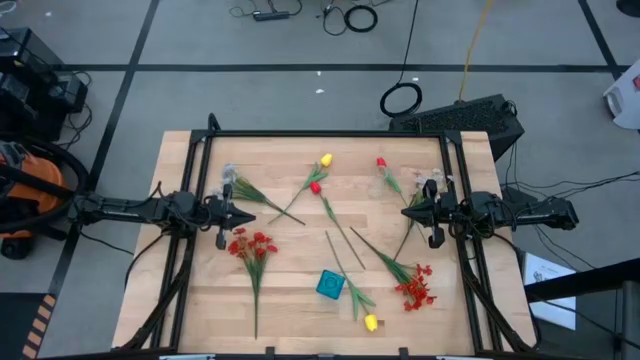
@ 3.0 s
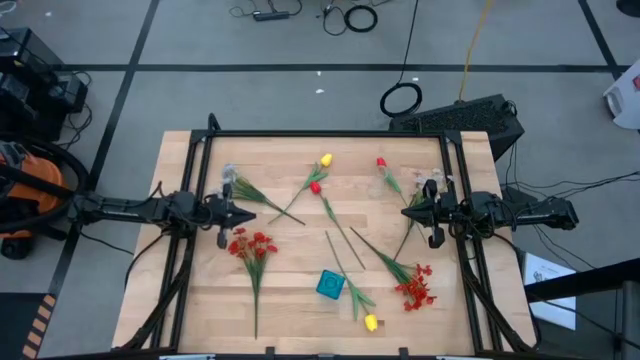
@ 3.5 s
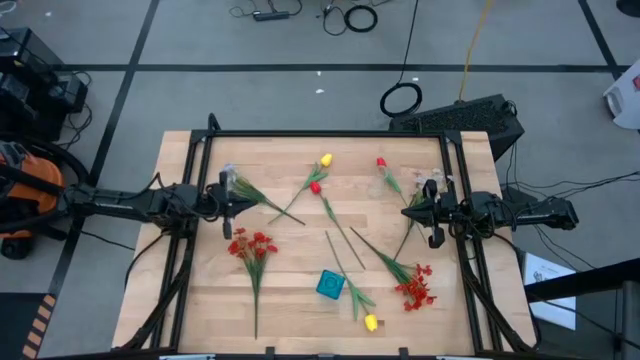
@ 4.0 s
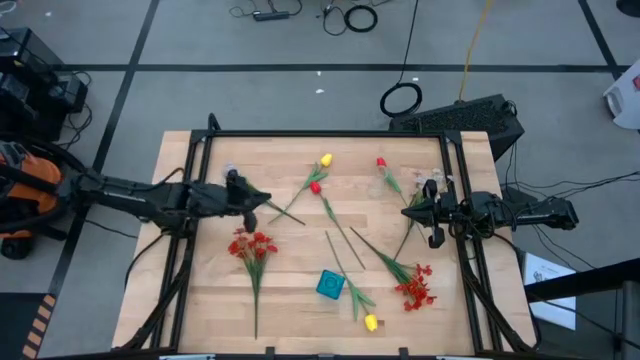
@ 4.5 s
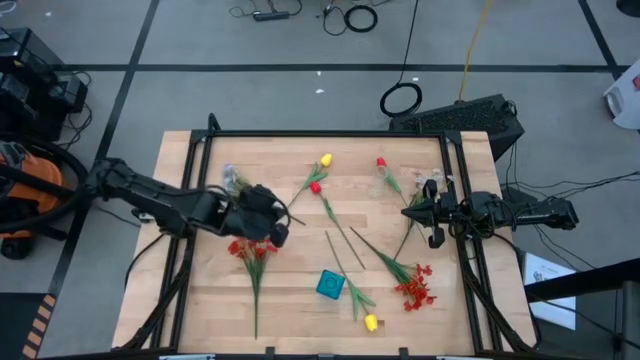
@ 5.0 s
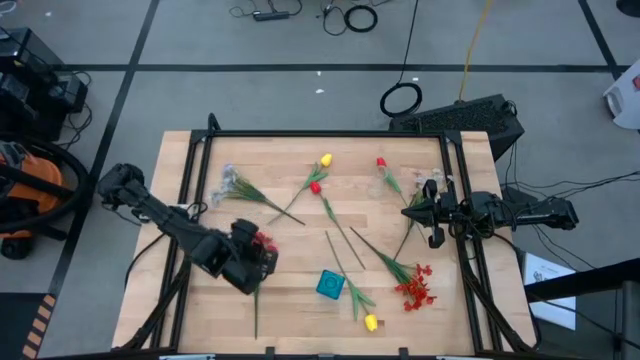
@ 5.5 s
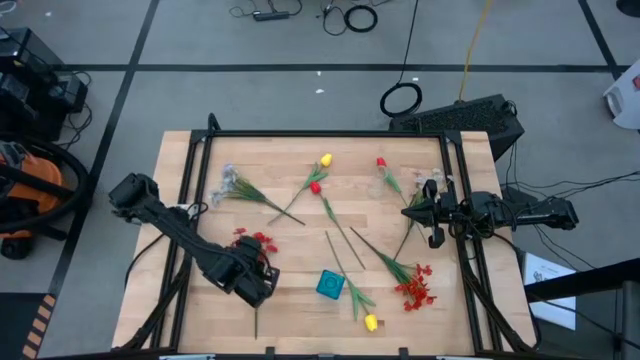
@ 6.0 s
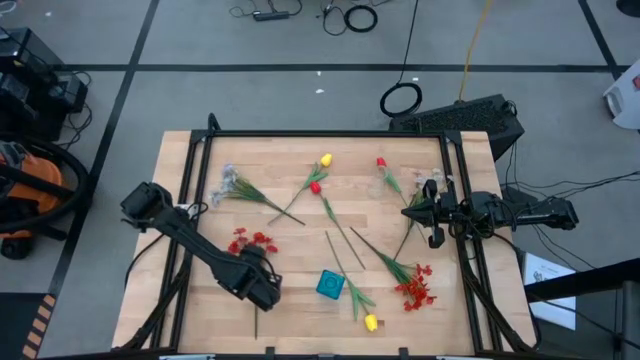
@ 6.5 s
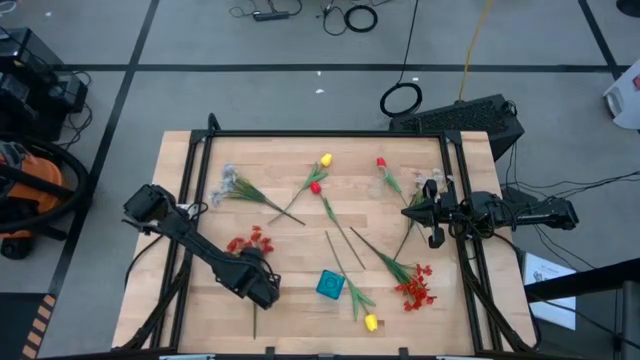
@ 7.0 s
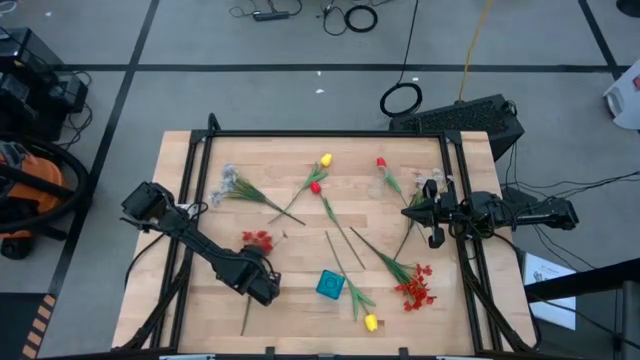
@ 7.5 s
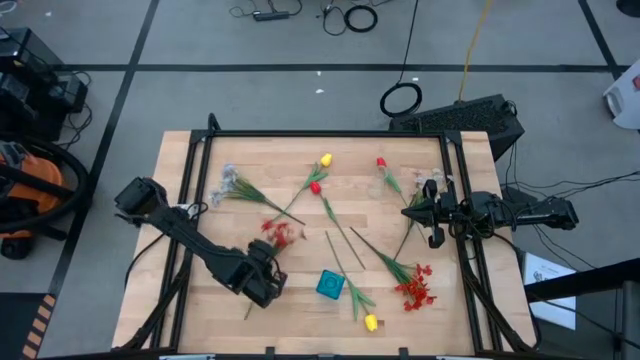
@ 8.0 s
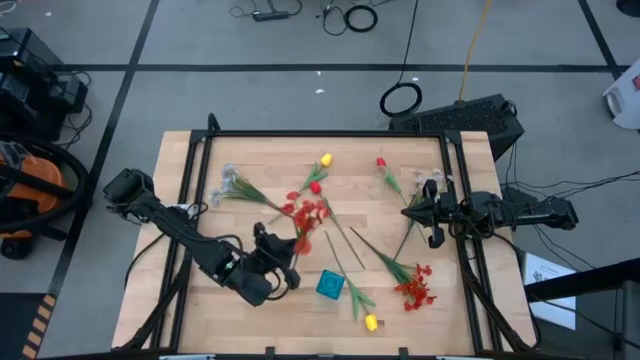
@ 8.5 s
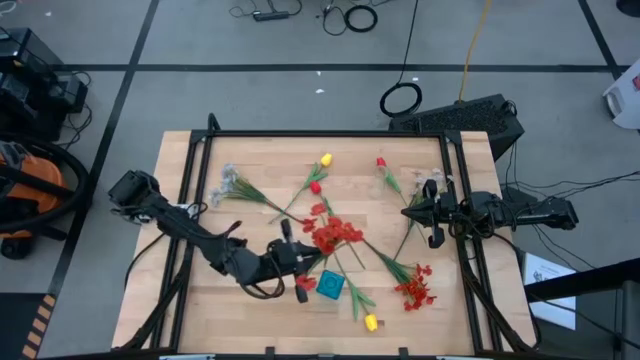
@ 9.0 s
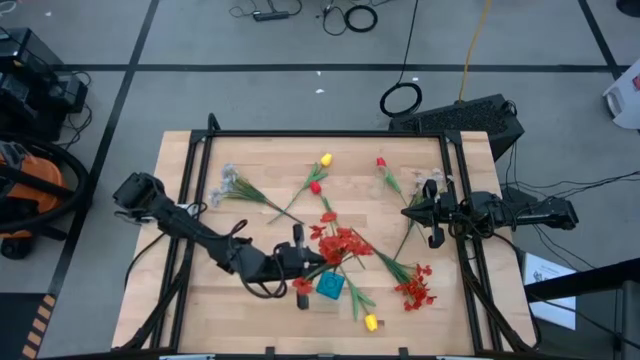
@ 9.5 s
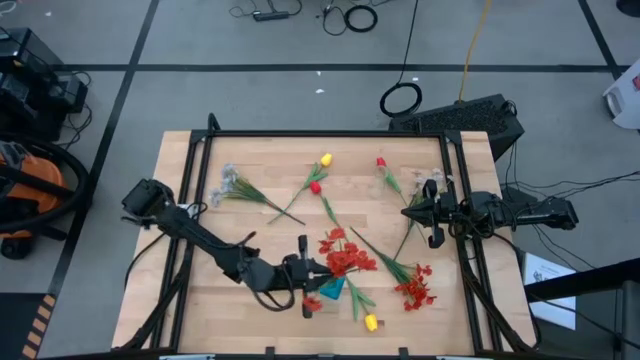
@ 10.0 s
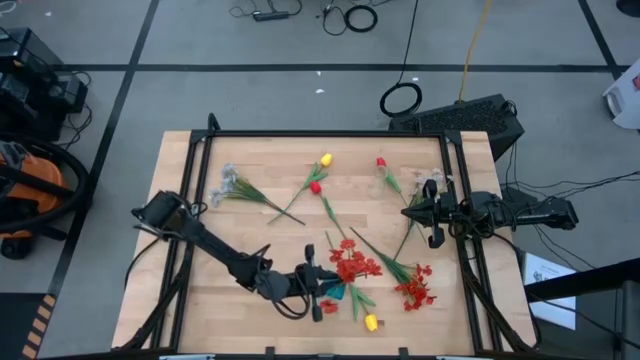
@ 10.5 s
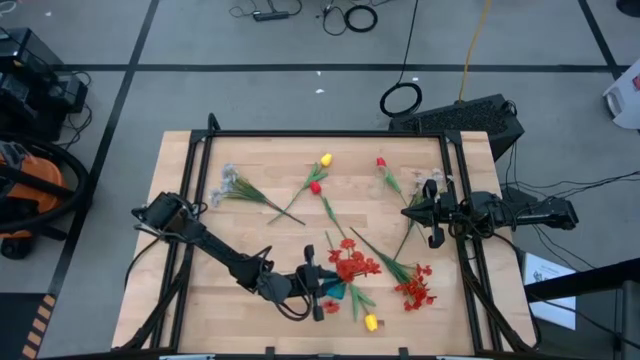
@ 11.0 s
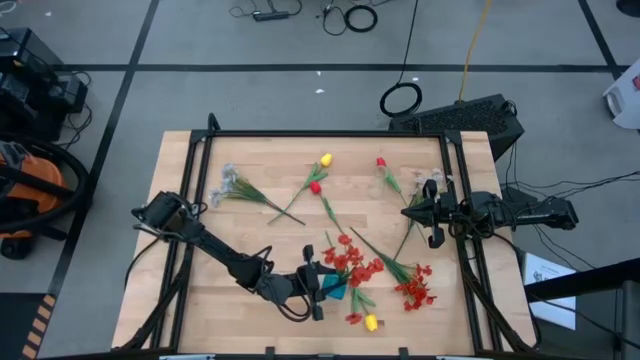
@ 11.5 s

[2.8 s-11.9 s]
Task: Sort flowers into vase by color
Put the left orange flowers into the blue vase

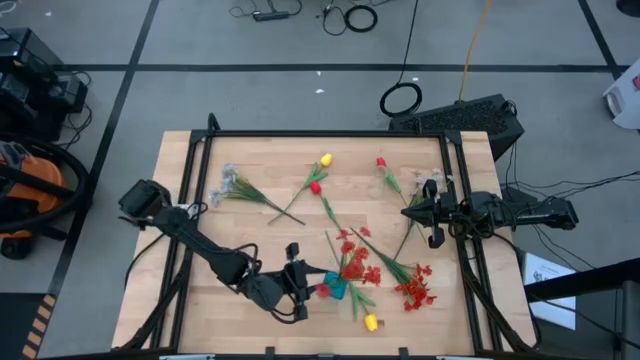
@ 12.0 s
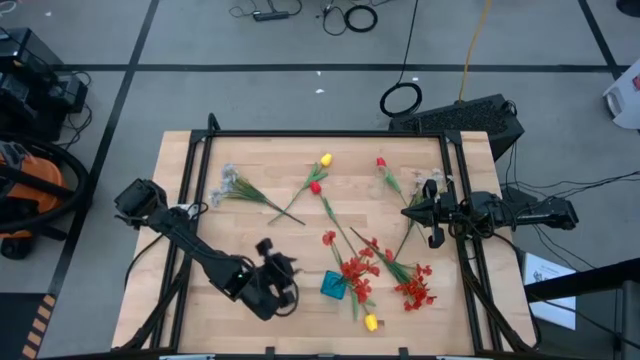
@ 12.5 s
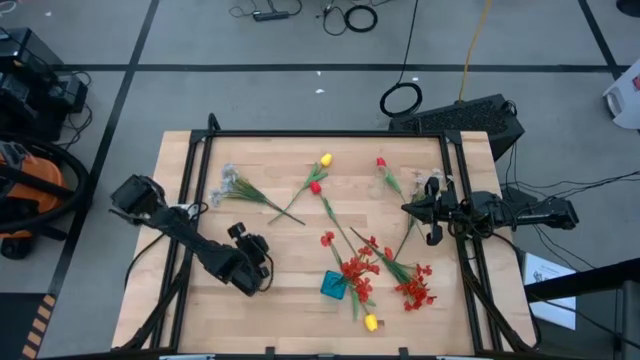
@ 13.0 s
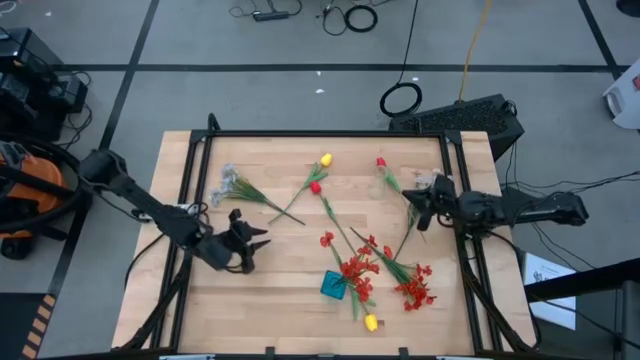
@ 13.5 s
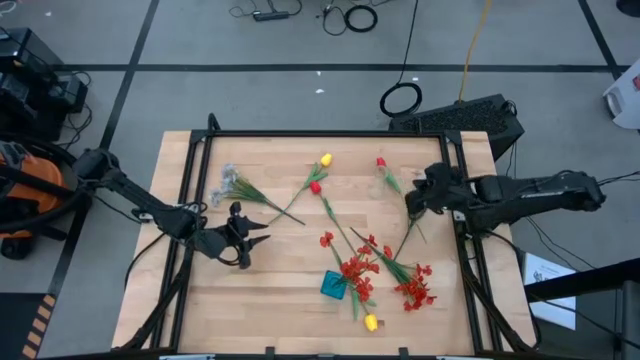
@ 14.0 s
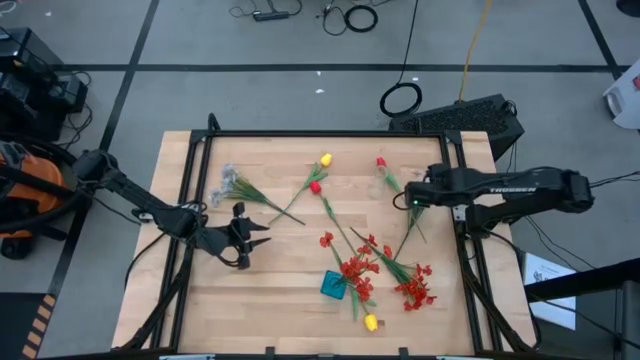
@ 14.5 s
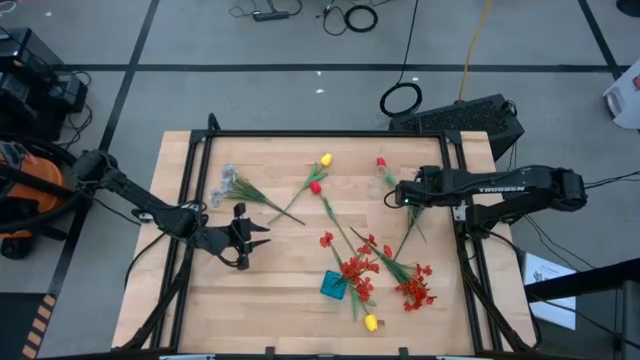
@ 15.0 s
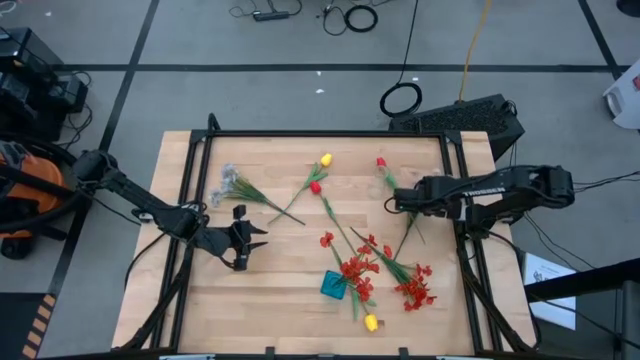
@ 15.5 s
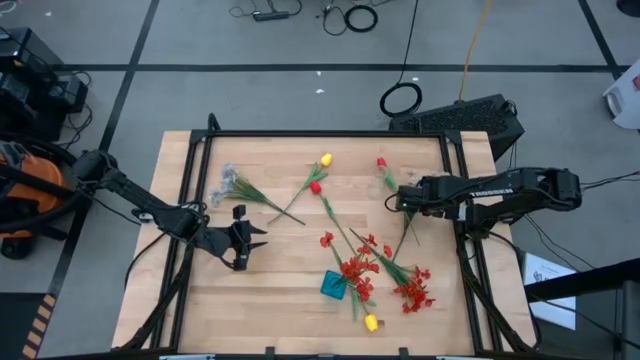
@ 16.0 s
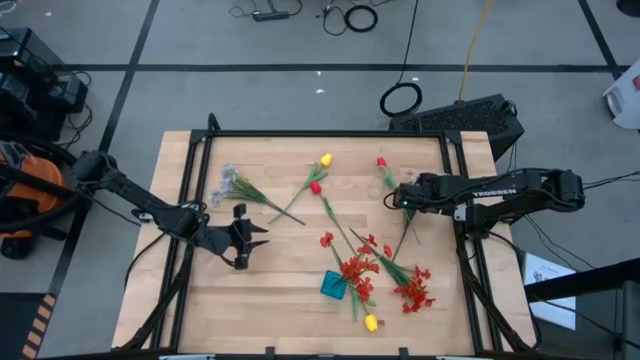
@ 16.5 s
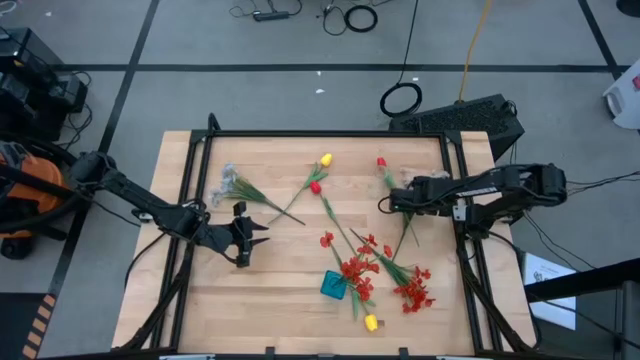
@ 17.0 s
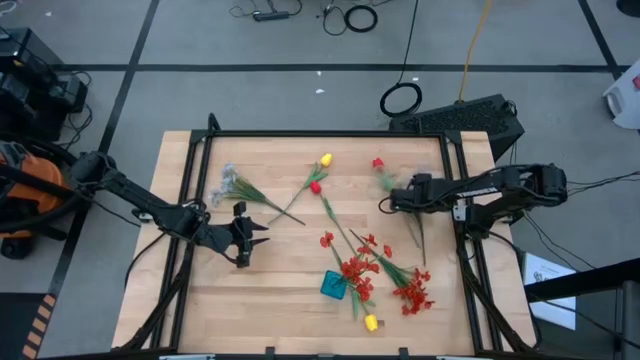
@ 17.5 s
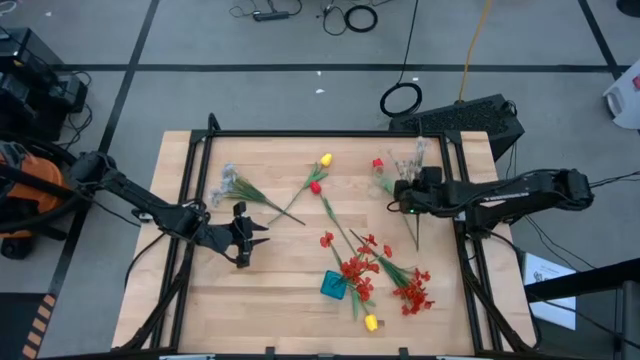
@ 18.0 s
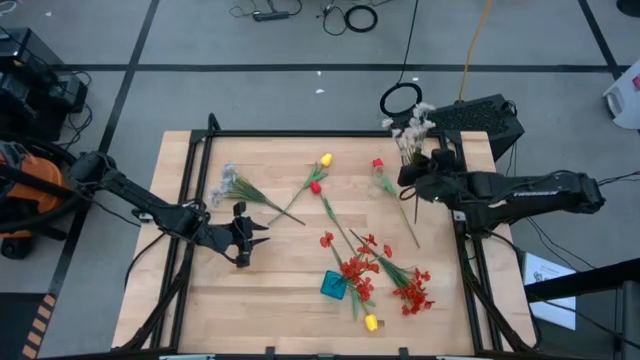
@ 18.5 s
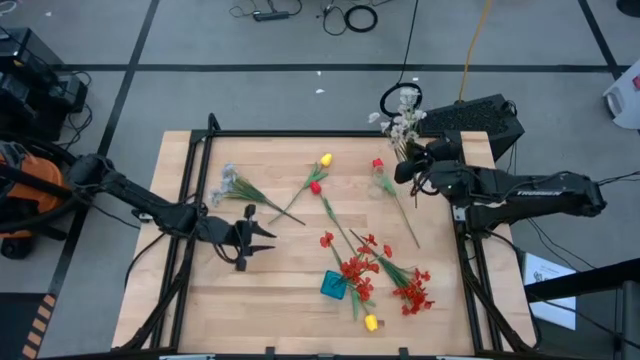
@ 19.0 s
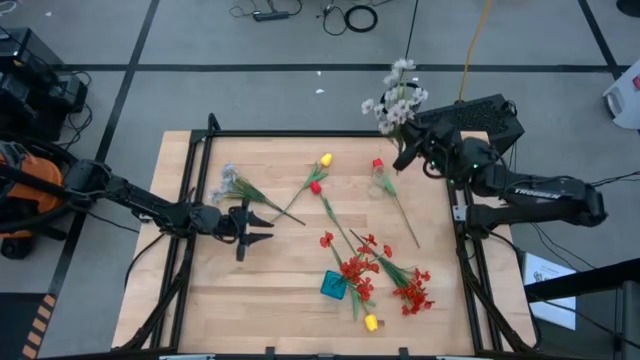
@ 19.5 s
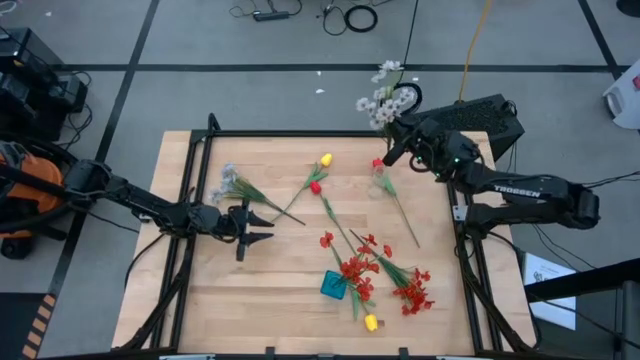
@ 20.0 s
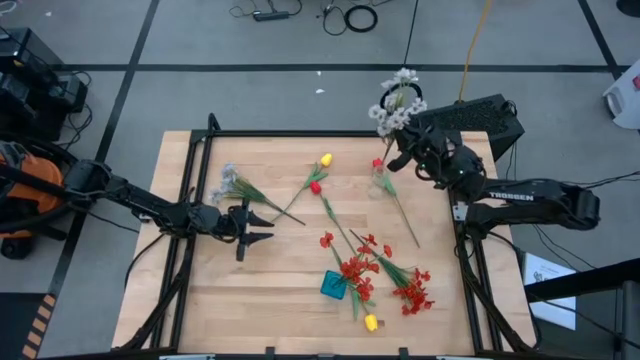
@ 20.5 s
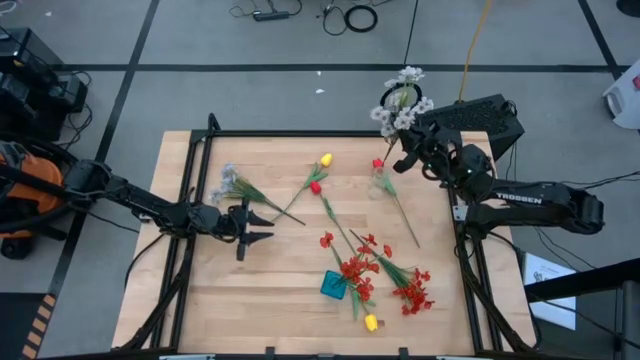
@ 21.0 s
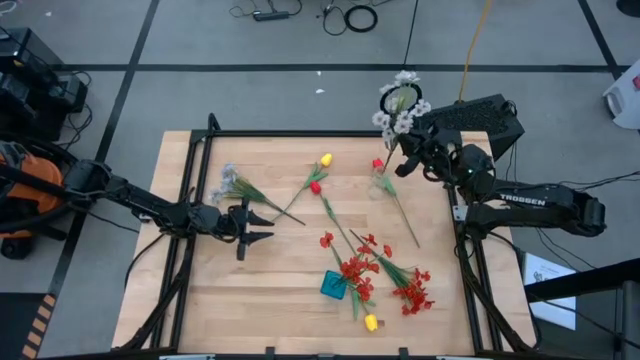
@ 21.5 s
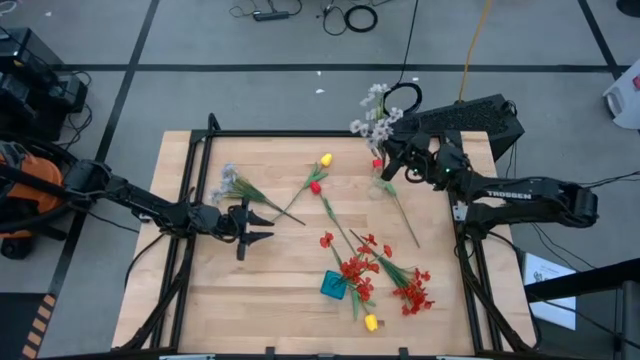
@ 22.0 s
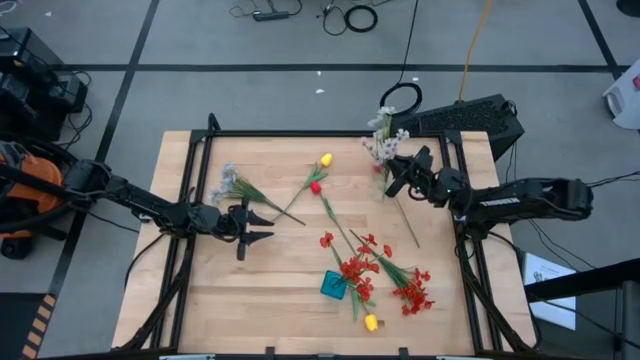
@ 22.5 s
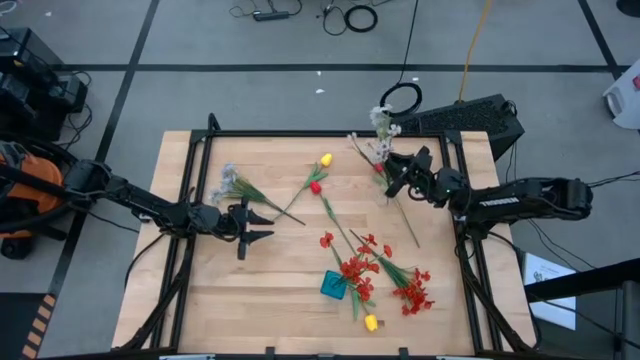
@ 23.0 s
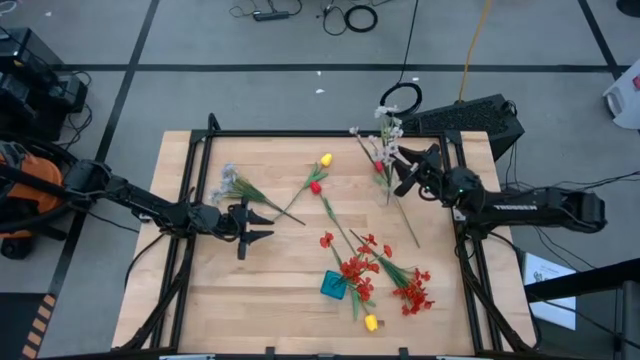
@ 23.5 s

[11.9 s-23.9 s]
Put the right white flowers into the transparent vase

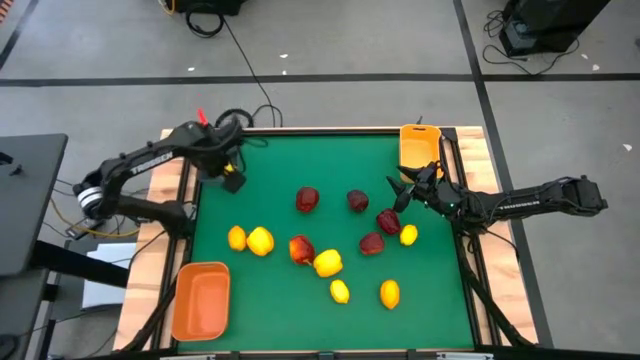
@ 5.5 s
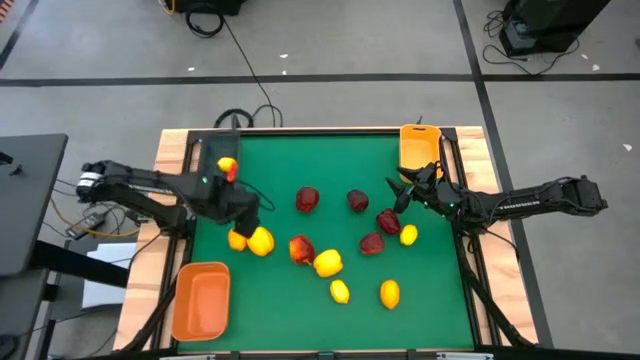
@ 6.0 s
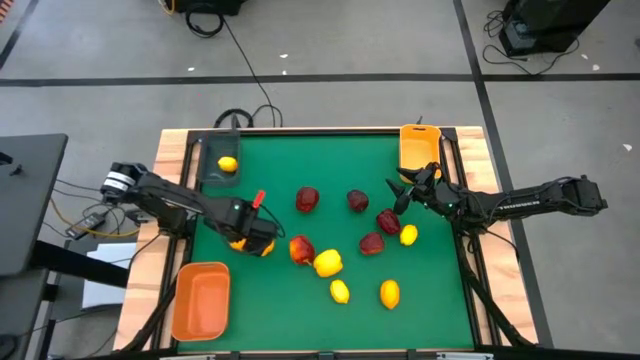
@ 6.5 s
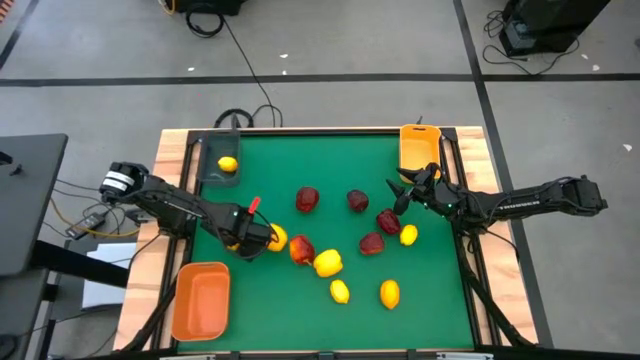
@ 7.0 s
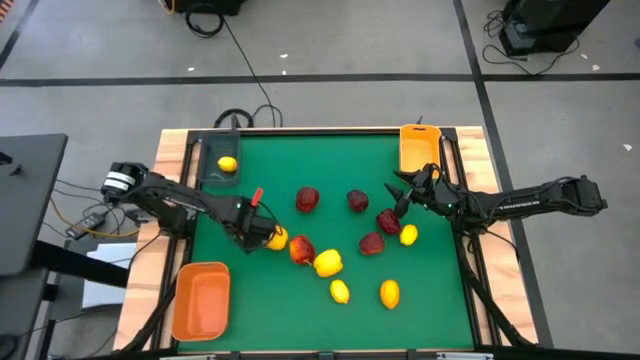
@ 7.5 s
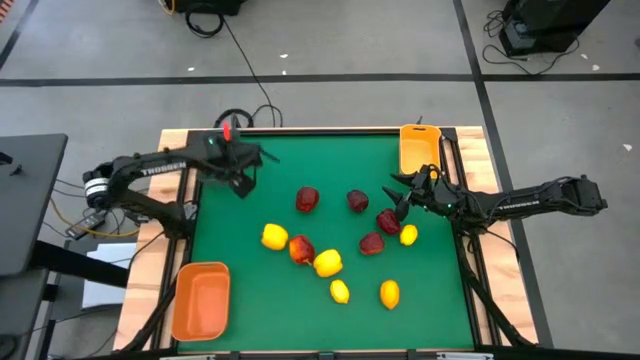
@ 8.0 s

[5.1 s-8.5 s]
Task: Sort produce into baskets
Put the lemon into the black bin
